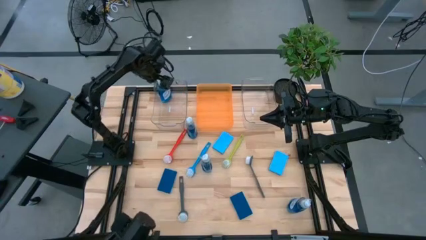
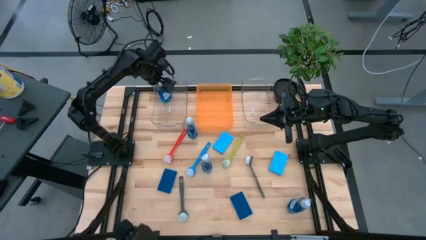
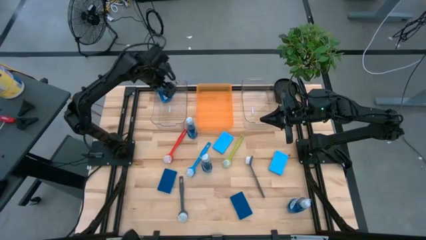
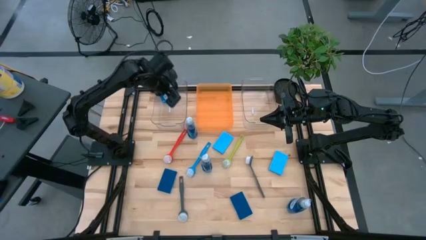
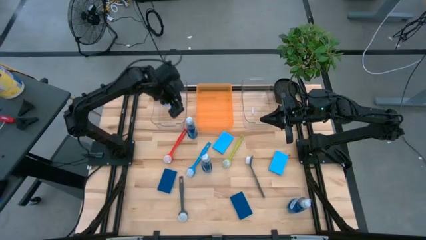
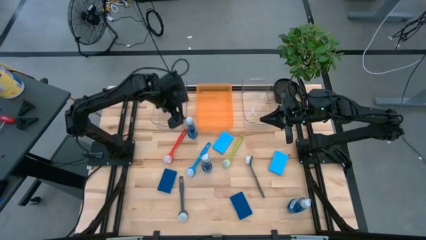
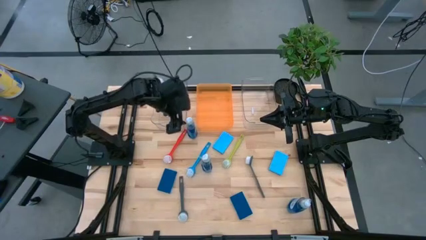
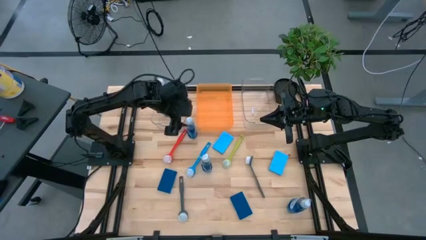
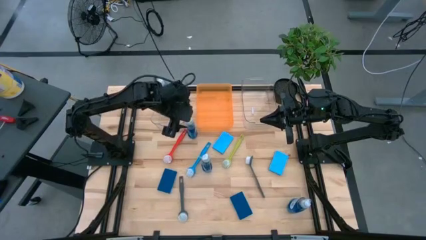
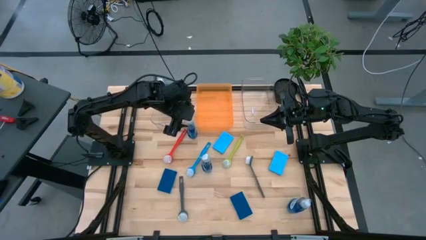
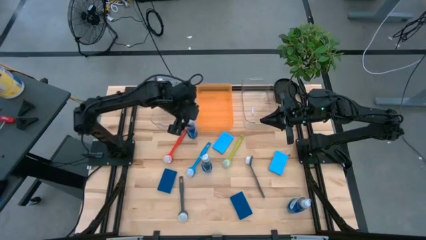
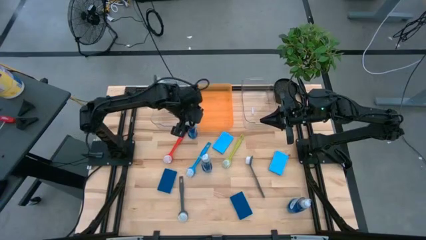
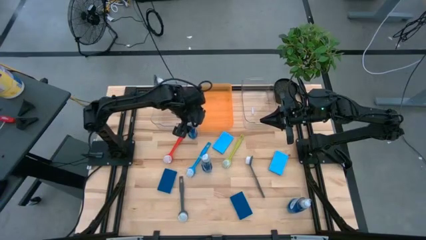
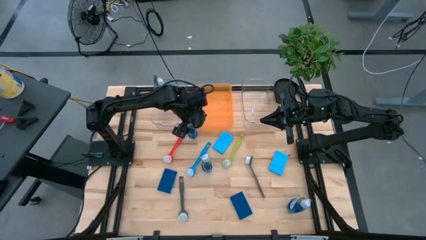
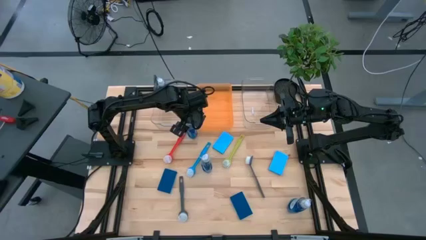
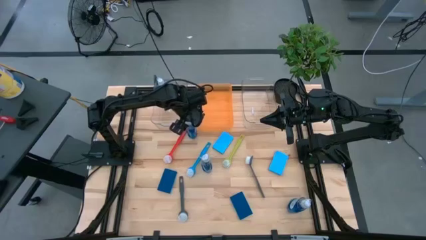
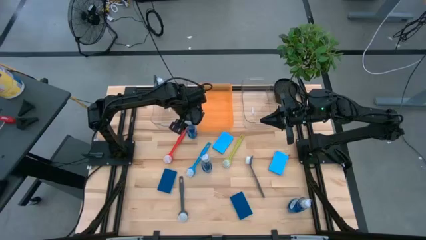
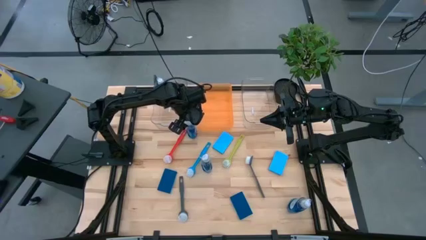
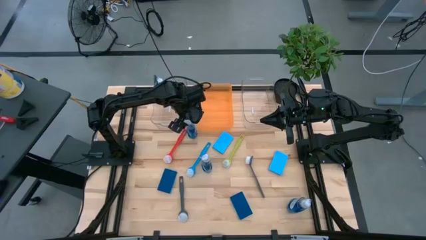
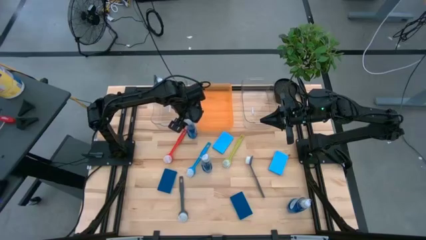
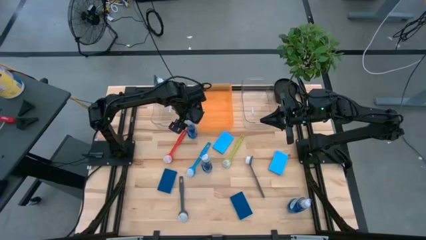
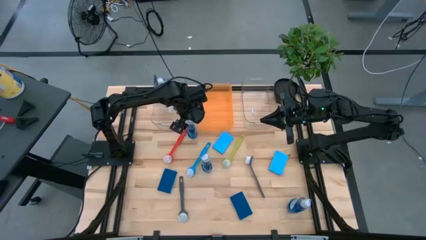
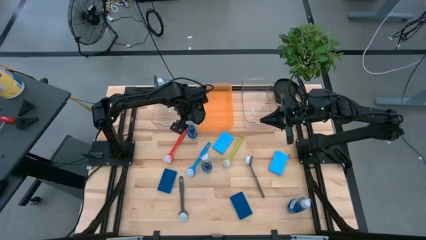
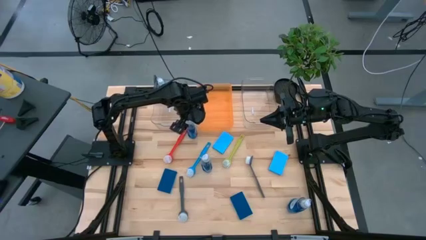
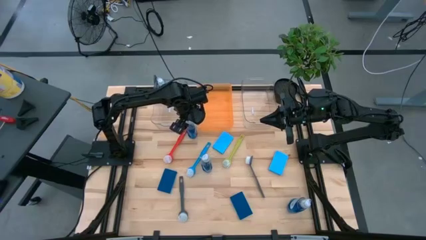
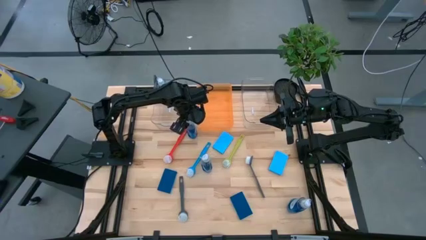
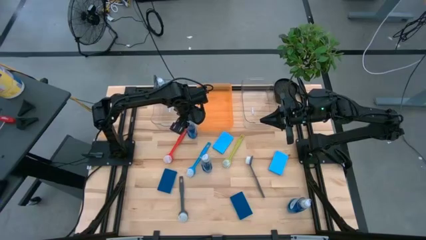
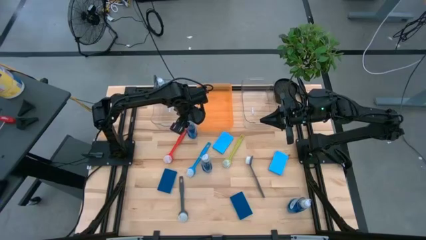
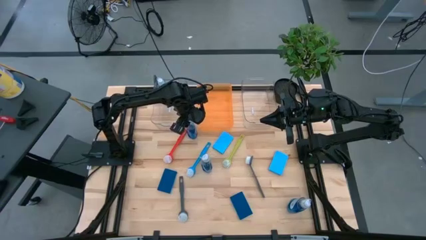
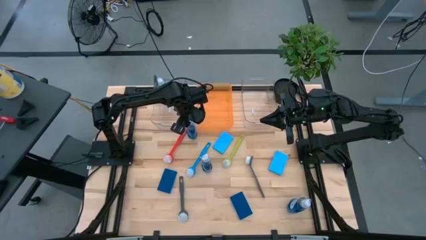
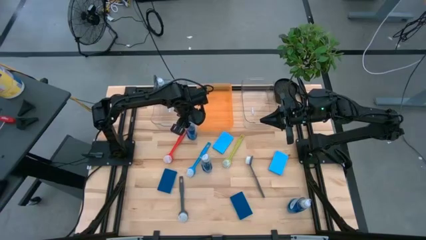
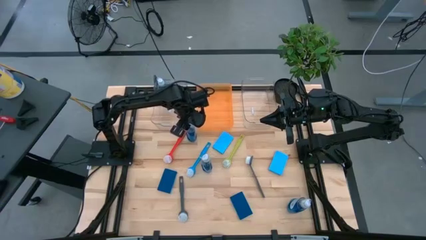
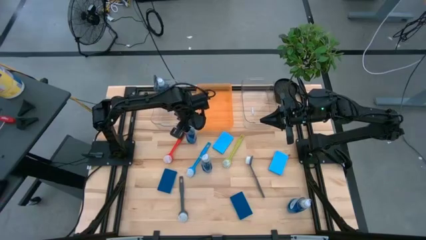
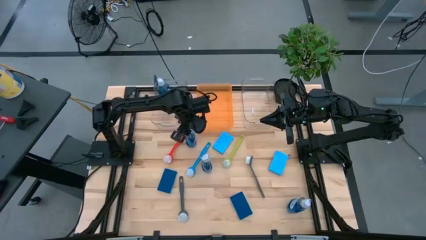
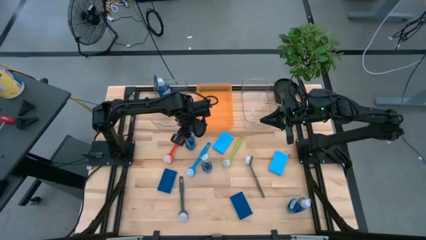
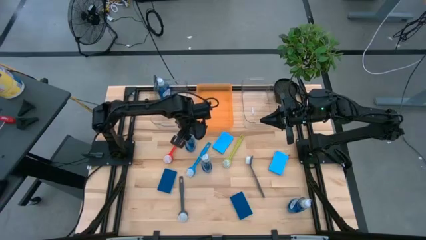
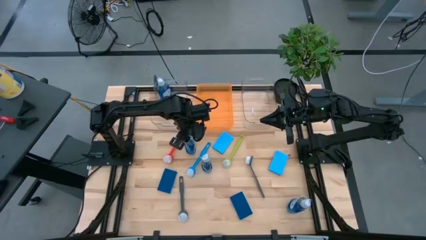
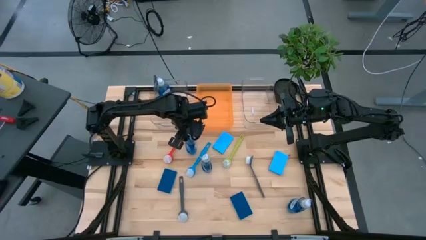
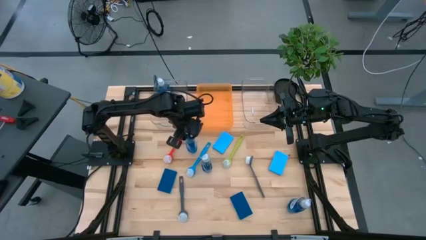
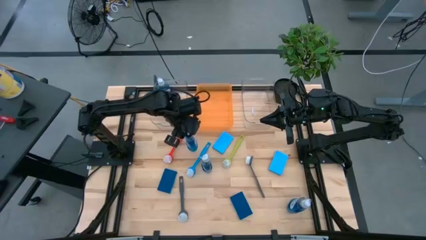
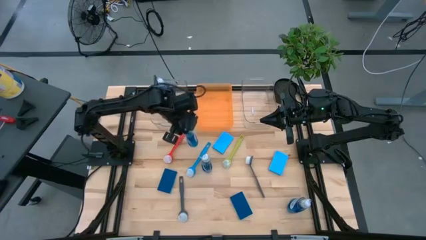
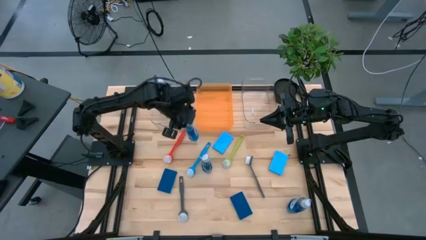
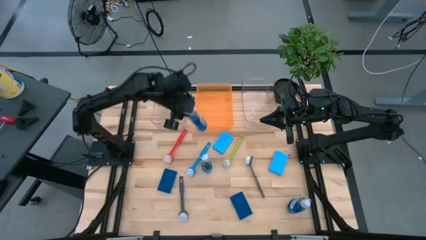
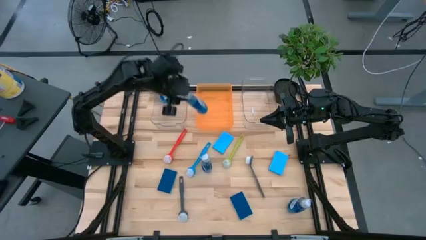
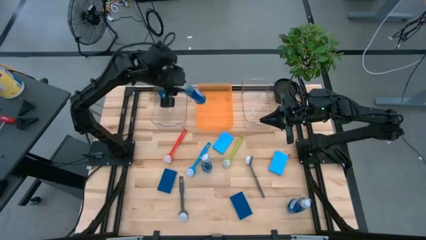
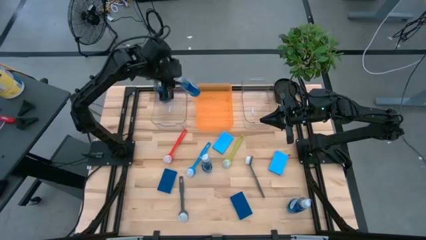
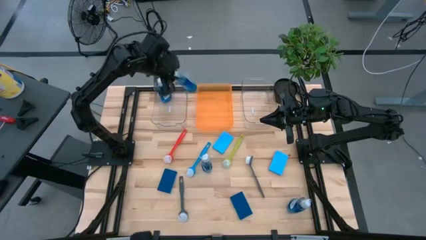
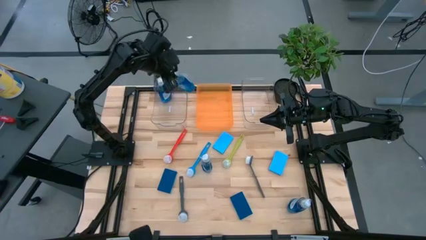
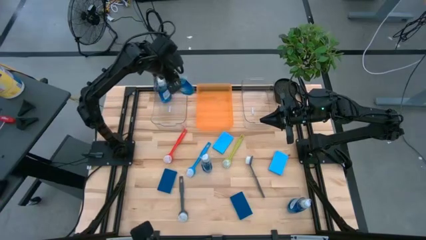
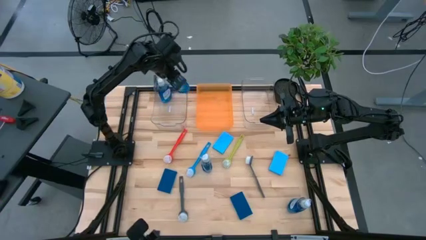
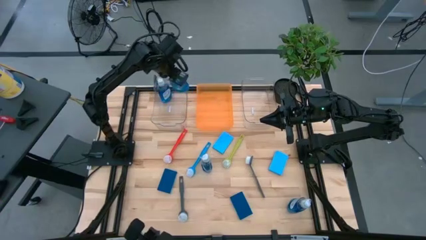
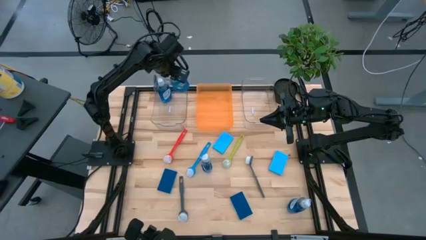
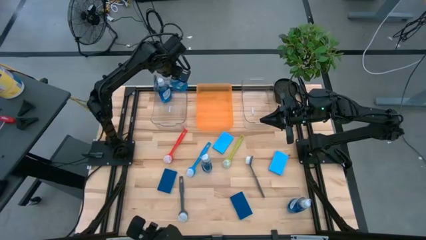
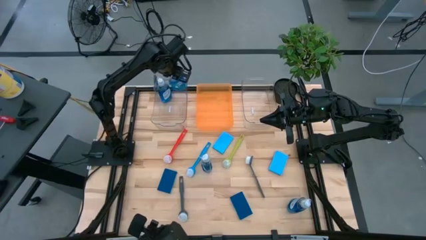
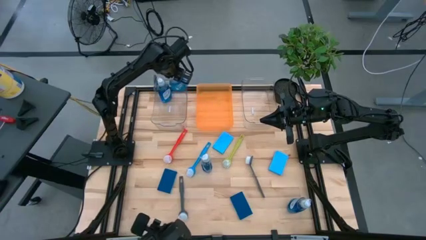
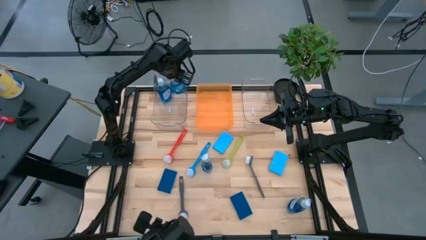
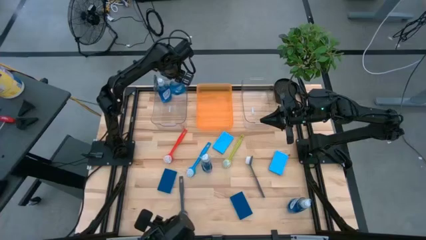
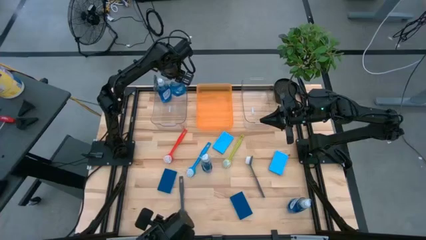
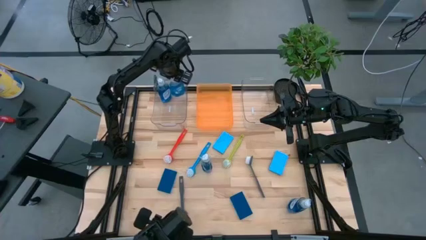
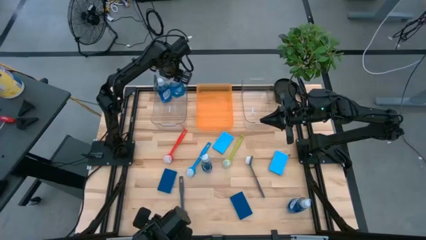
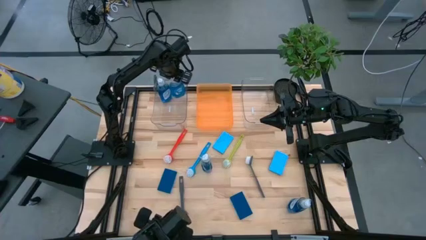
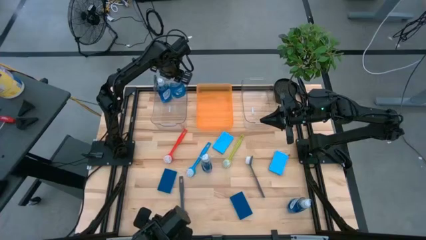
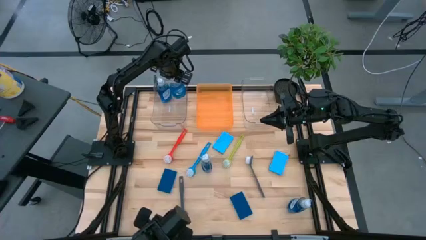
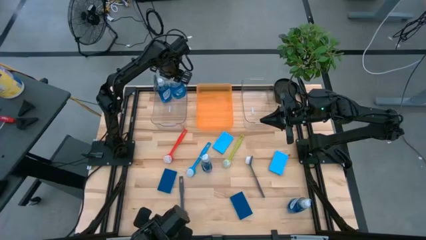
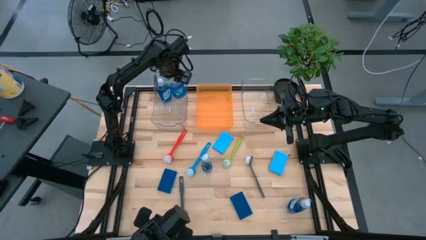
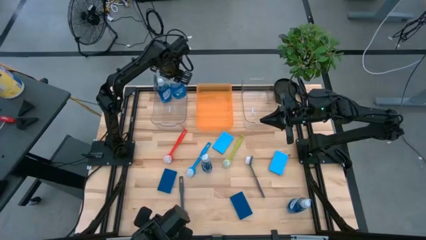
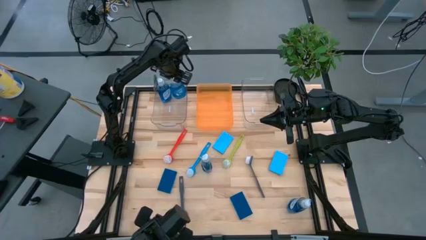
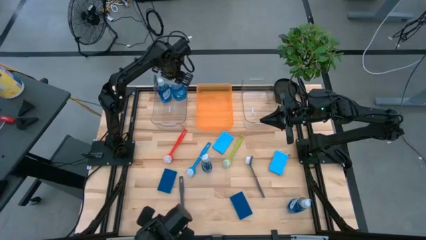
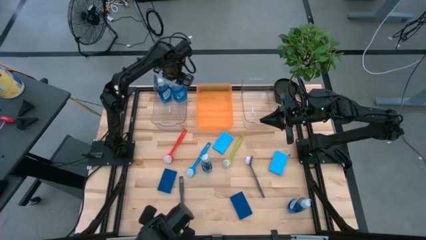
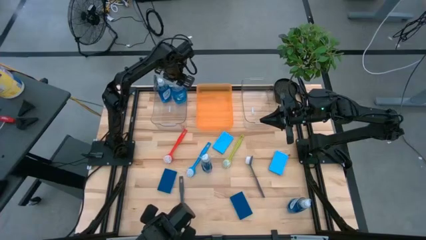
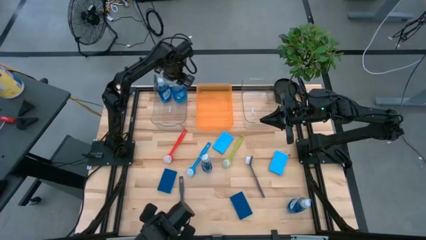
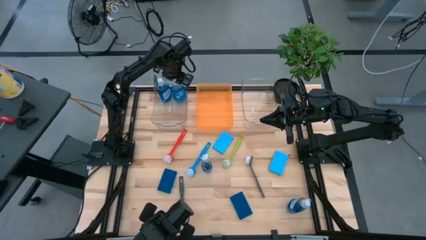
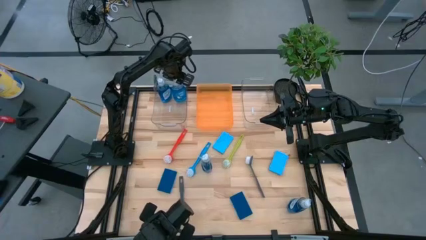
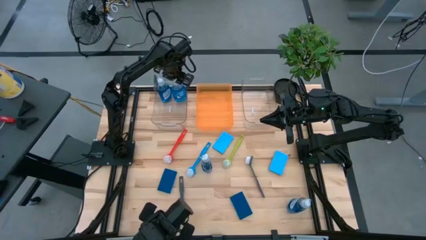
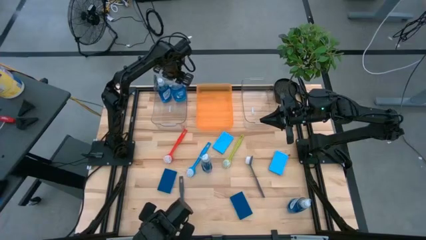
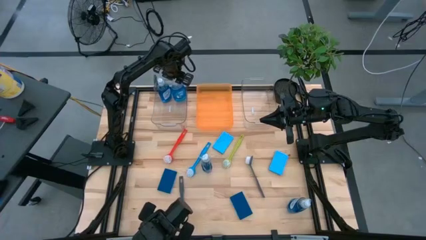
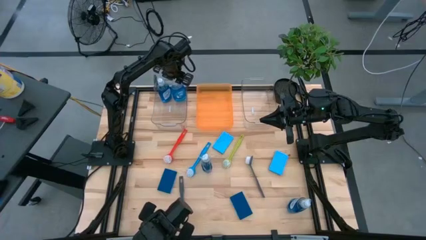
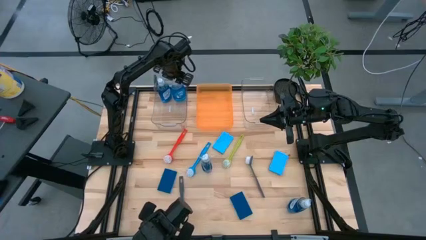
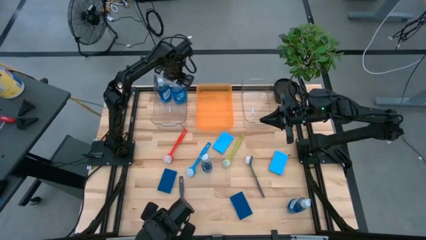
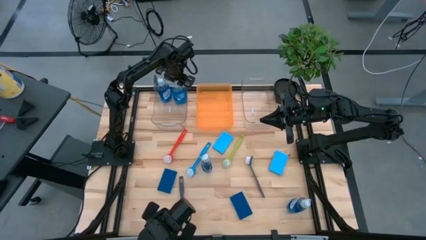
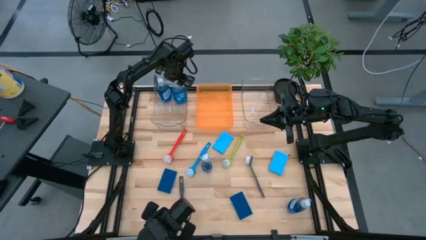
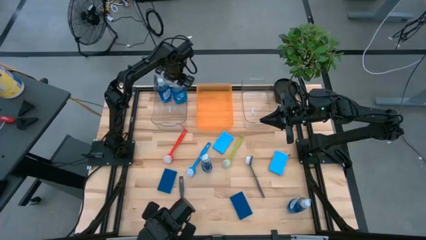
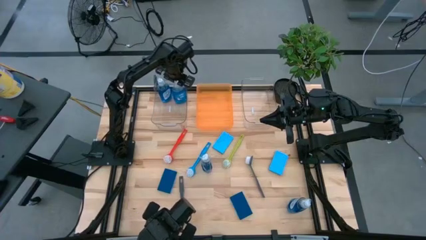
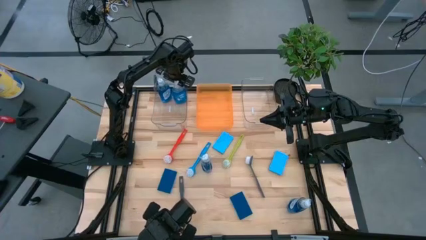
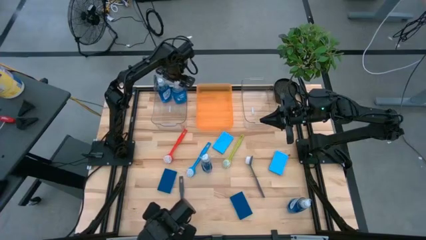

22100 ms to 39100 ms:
Task: Pick & Place Kitchen Sink Supplies
Put the dish soap into the left transparent bin
